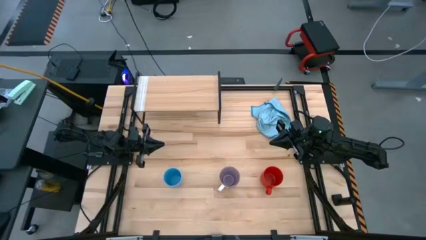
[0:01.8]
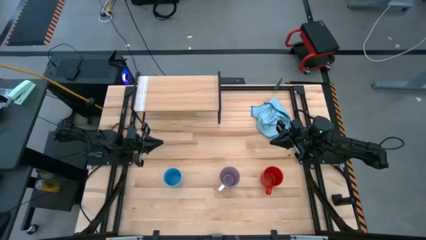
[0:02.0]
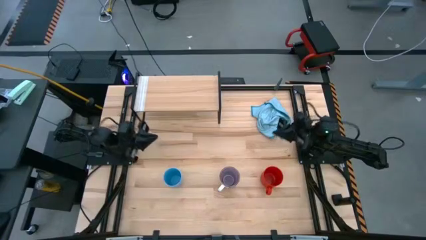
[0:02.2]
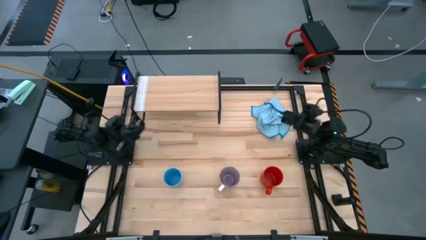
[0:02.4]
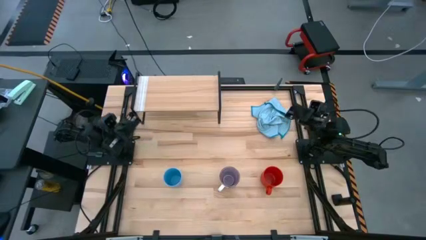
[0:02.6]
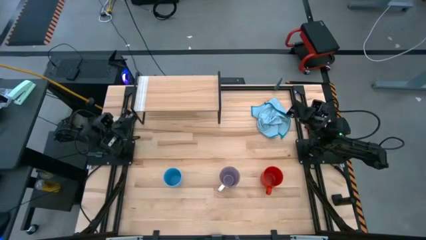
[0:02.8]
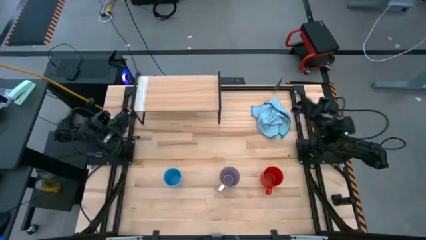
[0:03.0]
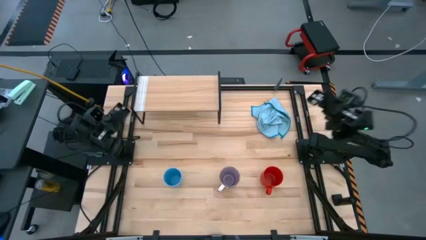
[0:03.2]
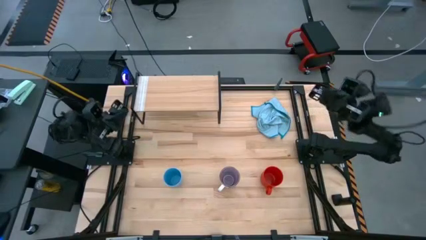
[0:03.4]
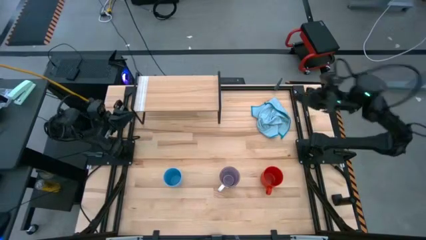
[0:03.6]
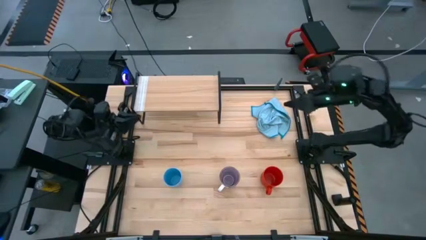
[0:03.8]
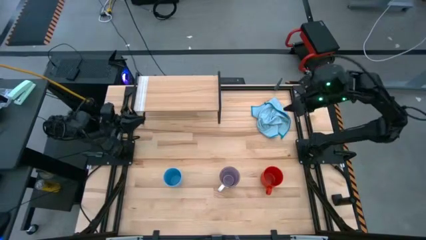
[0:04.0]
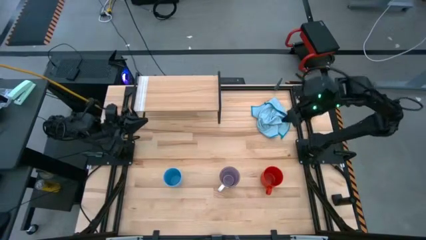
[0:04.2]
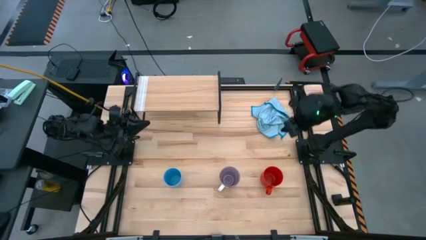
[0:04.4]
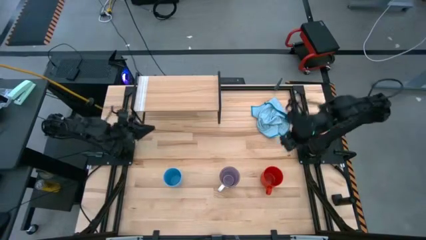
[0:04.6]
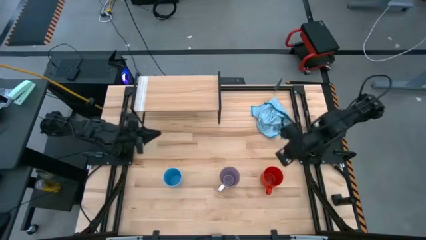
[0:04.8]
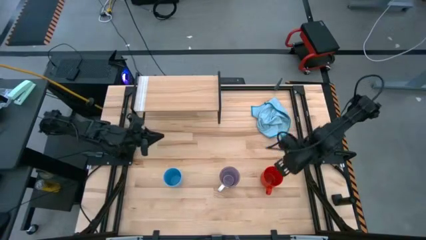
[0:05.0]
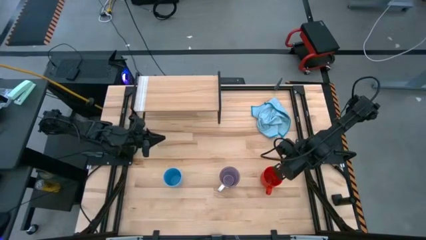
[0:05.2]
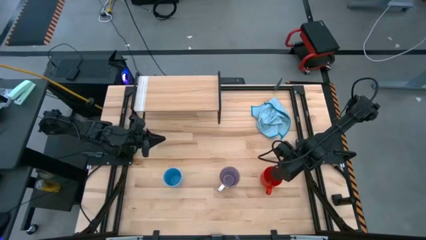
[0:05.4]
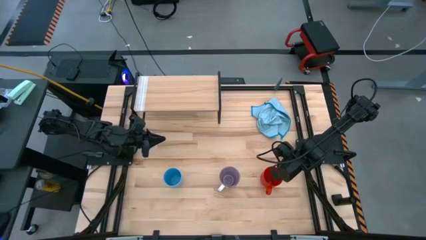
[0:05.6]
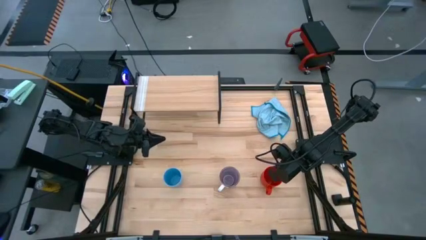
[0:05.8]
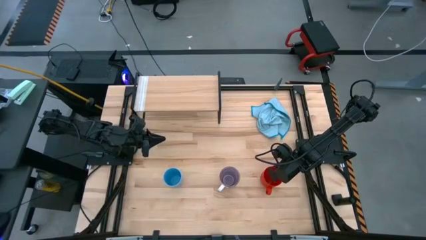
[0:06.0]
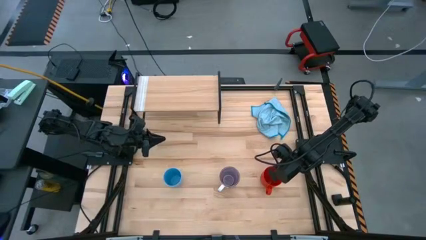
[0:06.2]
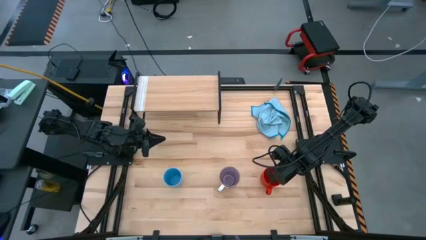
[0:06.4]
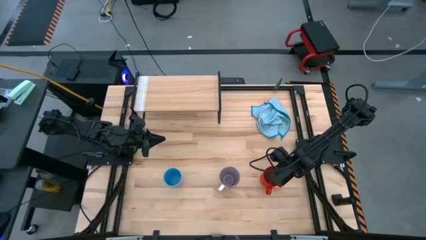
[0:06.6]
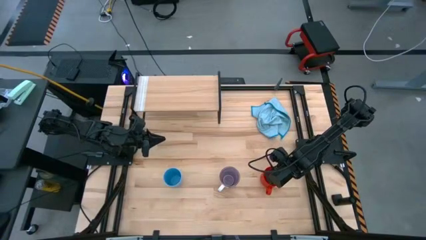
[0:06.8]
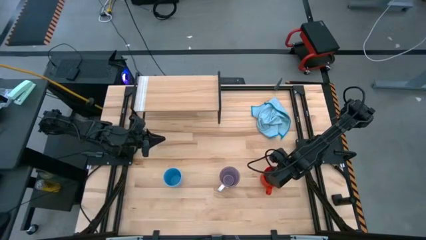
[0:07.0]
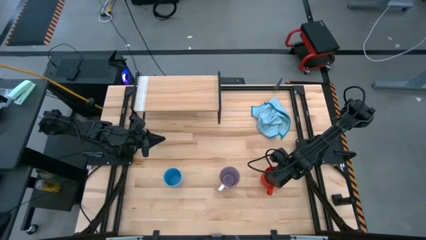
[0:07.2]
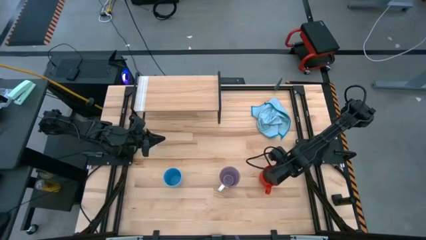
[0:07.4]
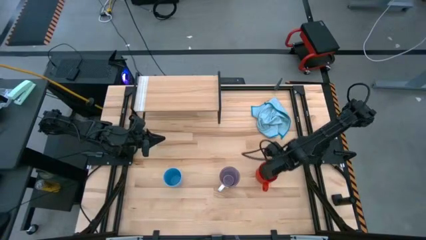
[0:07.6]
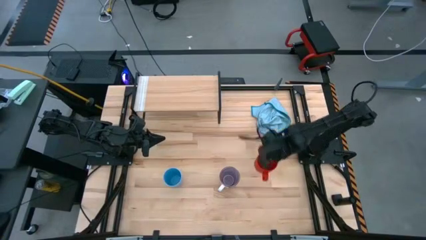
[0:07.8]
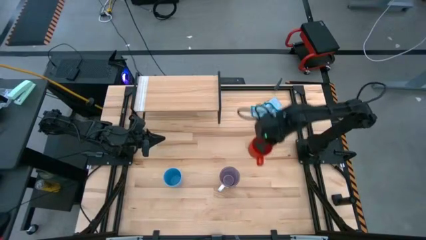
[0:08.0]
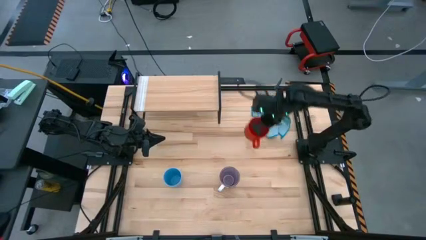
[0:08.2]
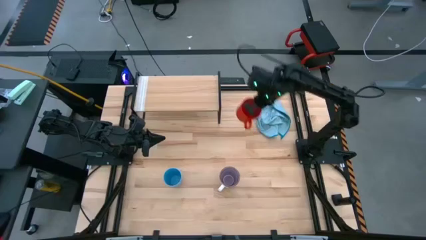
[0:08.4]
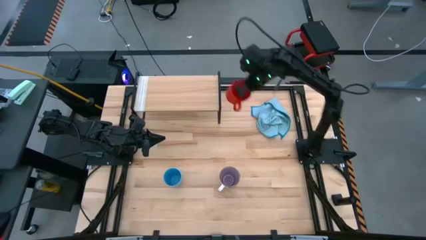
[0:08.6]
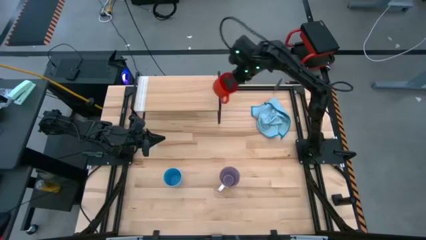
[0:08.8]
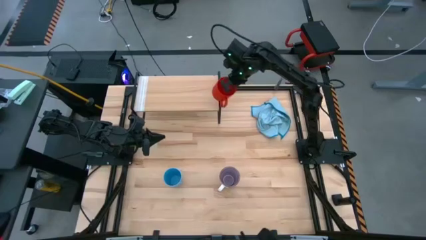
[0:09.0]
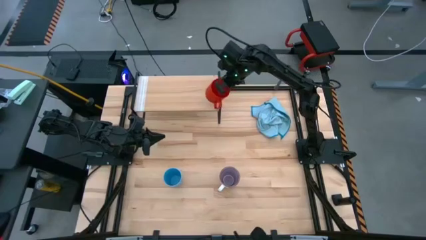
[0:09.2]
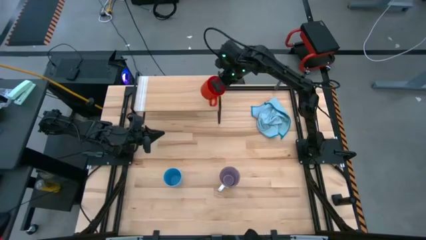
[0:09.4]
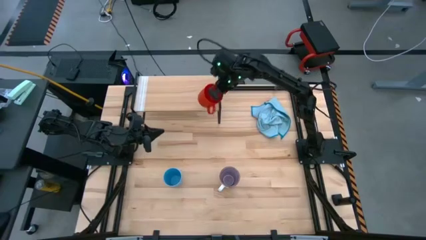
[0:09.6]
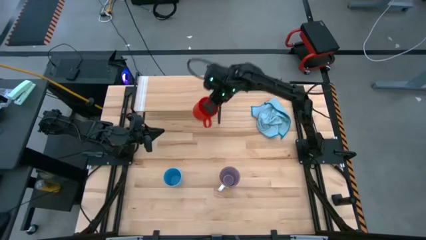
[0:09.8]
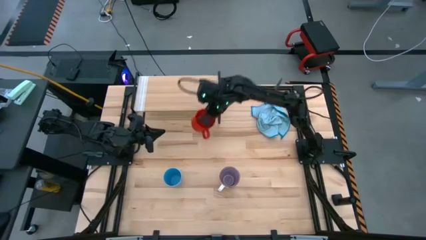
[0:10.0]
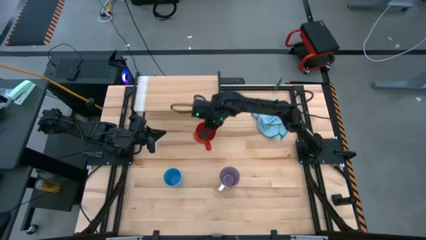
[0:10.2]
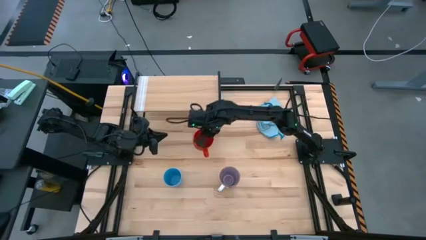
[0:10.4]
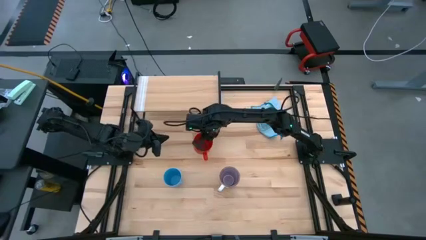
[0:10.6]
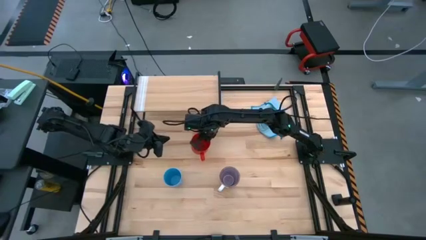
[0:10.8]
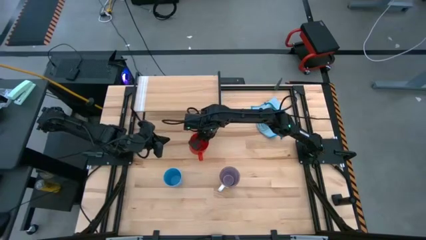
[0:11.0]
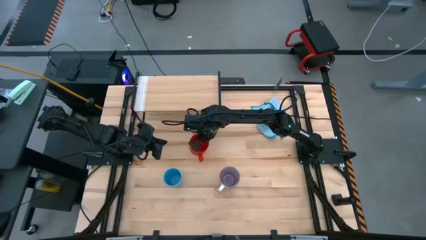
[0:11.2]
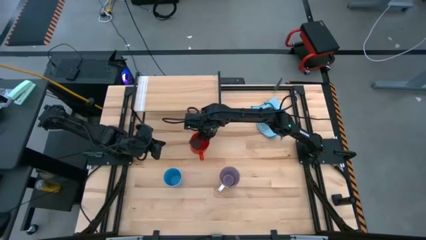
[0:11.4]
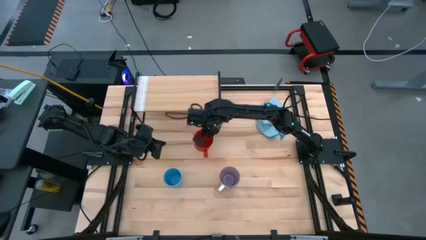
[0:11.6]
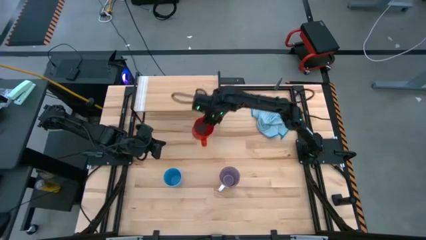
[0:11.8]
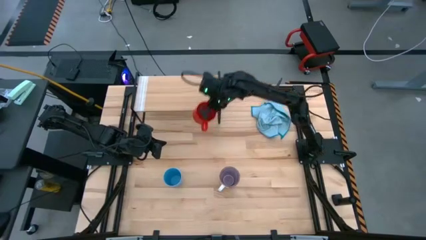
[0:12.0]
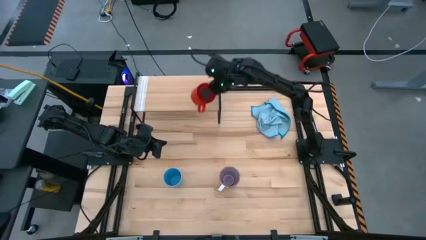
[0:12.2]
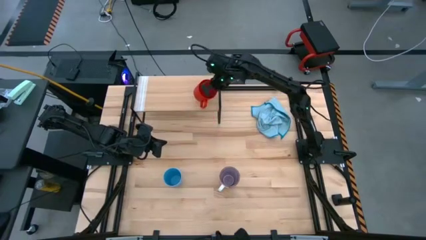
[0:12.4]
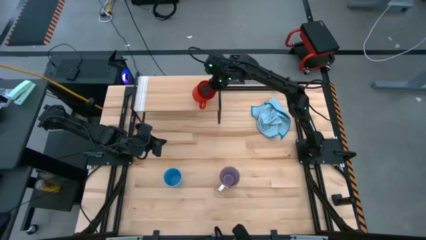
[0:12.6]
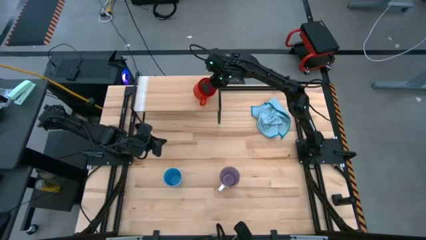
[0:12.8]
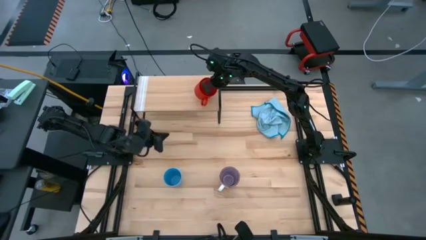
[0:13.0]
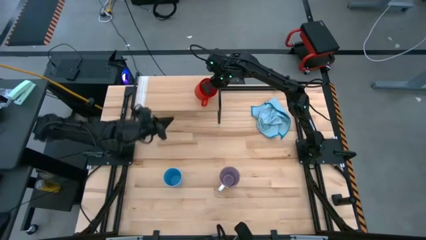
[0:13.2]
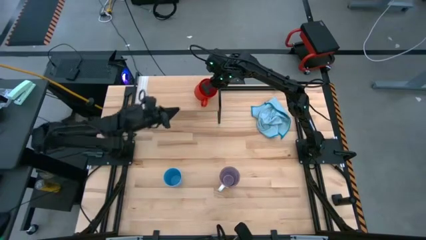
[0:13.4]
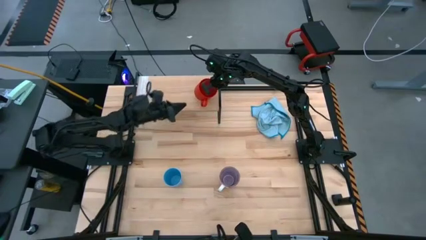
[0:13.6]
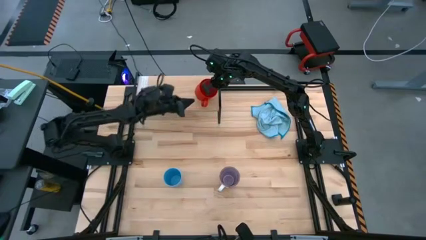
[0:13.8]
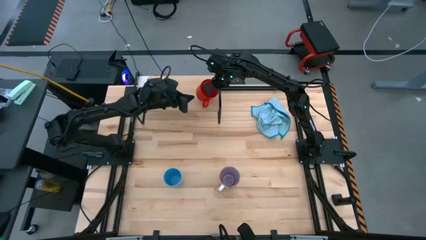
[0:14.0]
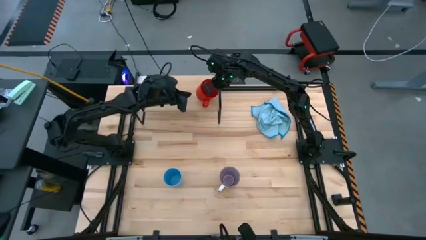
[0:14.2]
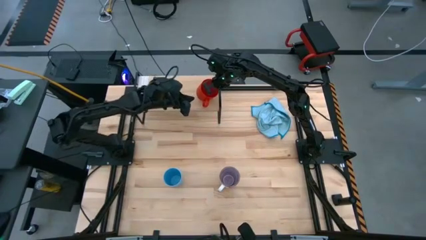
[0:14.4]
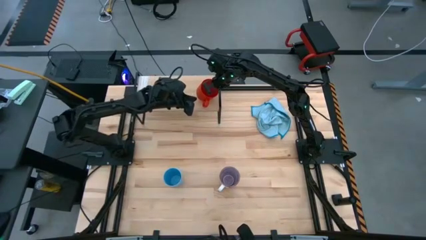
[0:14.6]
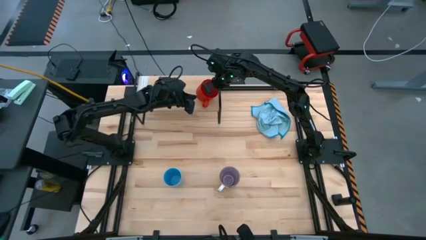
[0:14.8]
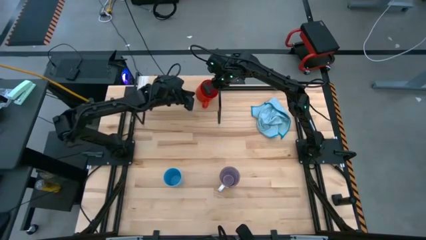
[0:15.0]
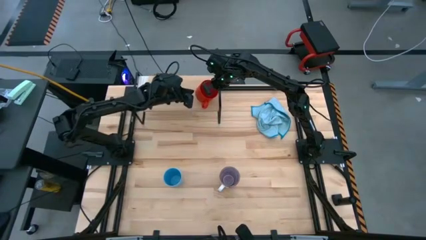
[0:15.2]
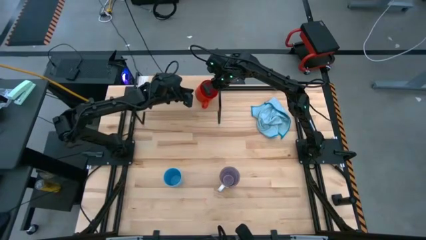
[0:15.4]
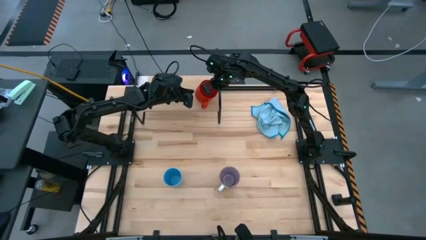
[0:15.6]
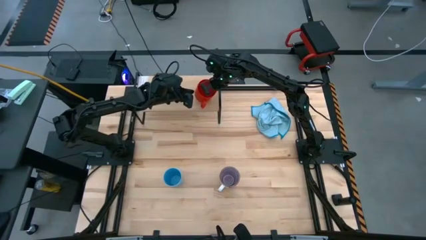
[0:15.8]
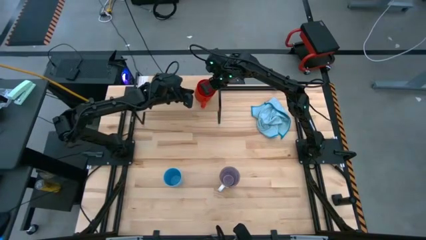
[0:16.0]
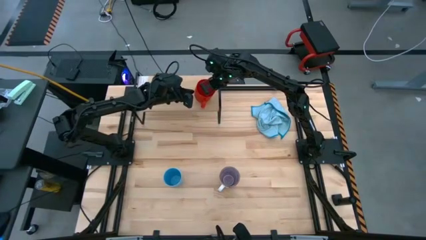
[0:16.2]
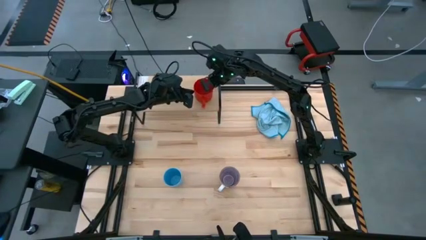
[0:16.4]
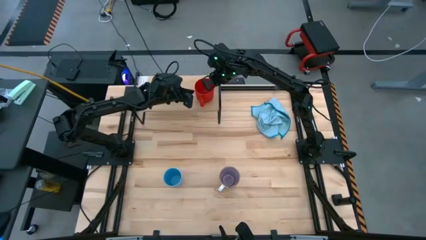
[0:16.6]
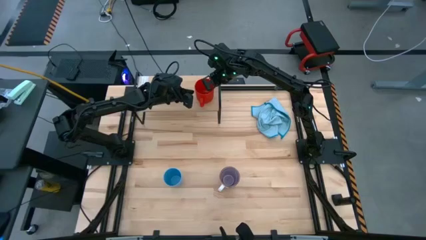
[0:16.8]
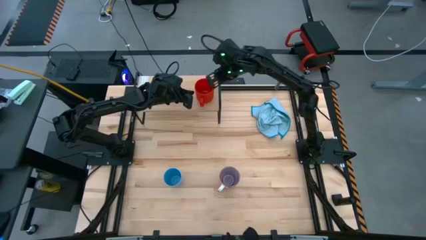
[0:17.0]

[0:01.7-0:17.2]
Task: Stack small to large cups/mugs on shelf
Put the orange cup on the shelf
